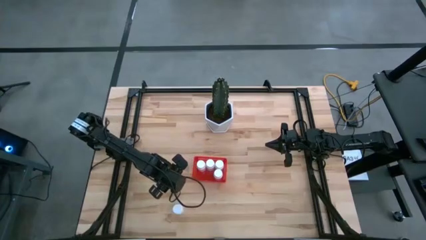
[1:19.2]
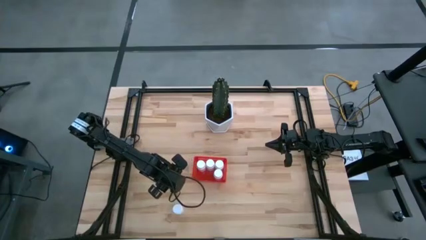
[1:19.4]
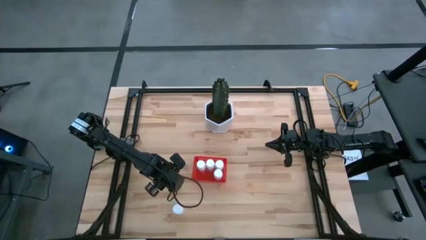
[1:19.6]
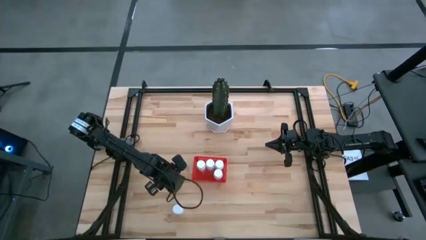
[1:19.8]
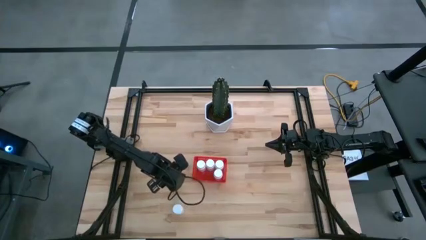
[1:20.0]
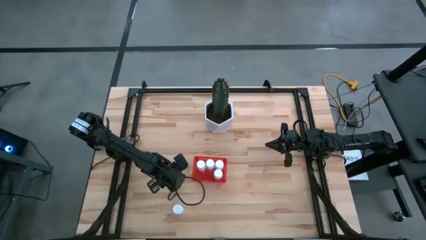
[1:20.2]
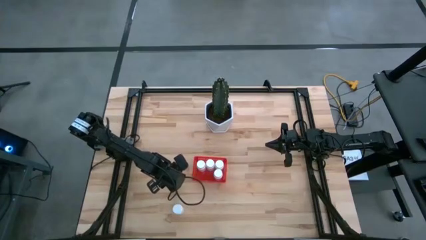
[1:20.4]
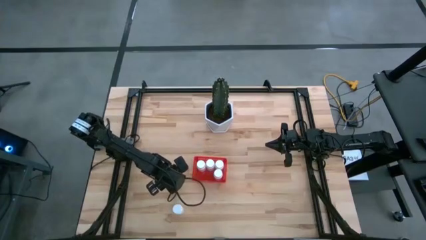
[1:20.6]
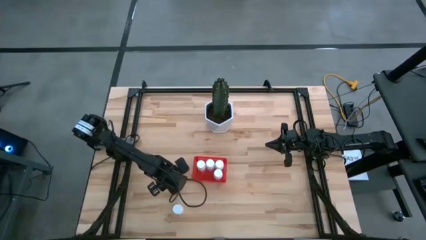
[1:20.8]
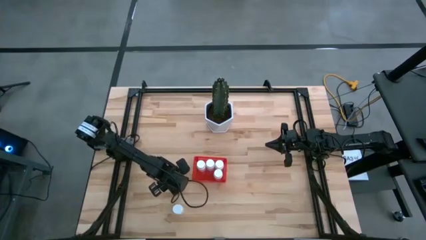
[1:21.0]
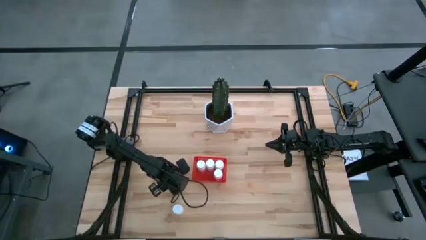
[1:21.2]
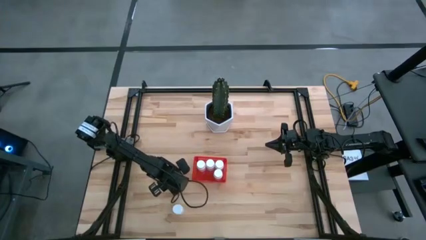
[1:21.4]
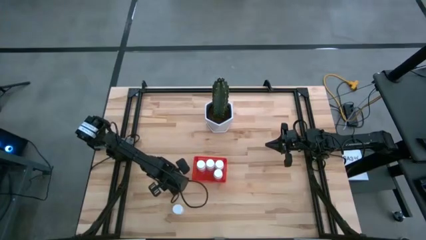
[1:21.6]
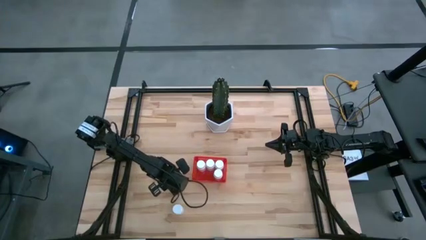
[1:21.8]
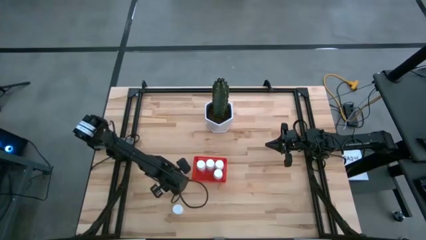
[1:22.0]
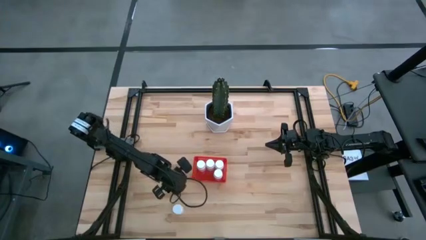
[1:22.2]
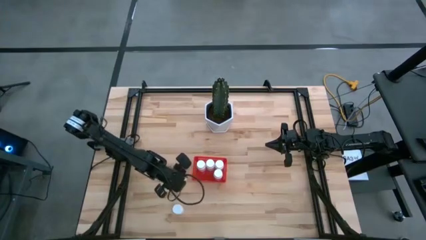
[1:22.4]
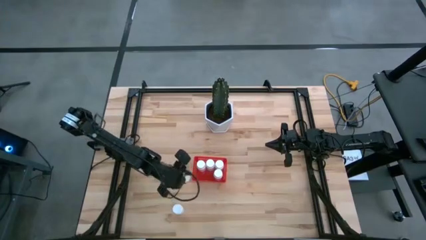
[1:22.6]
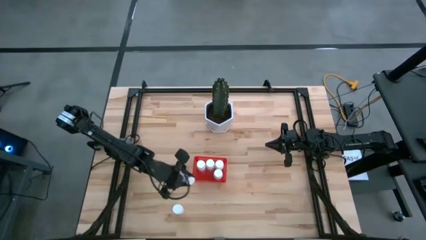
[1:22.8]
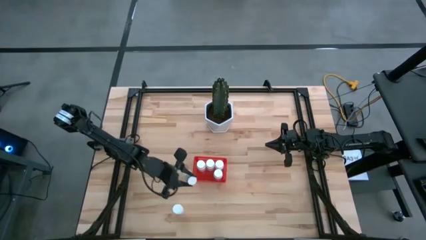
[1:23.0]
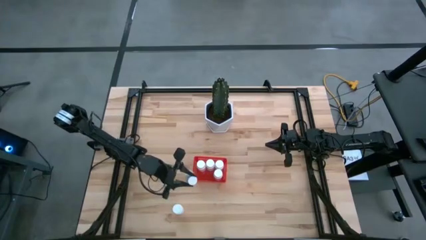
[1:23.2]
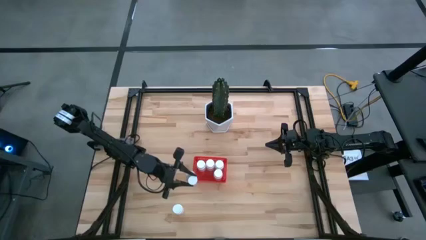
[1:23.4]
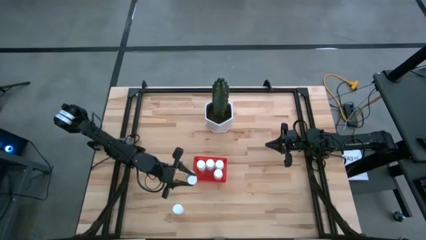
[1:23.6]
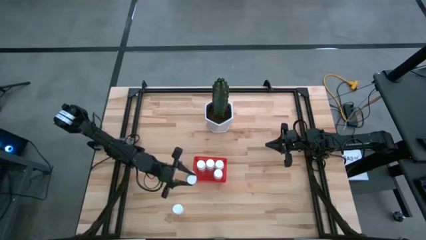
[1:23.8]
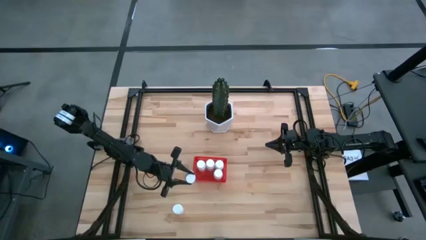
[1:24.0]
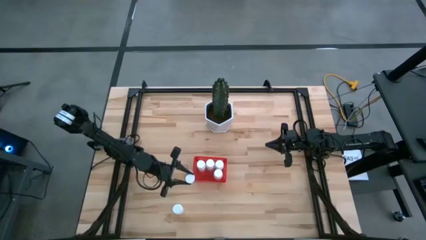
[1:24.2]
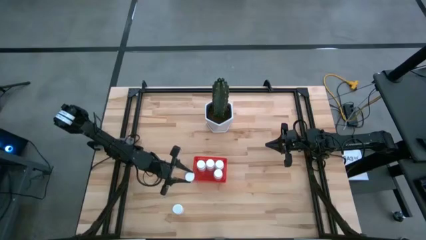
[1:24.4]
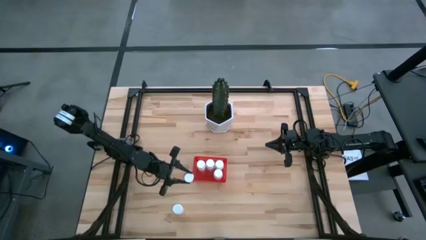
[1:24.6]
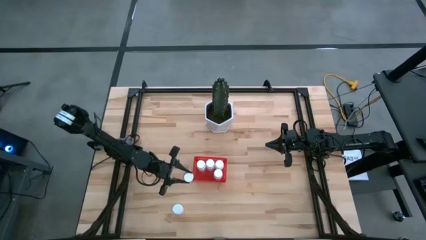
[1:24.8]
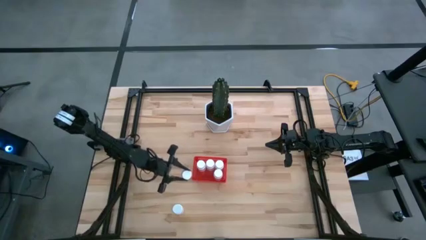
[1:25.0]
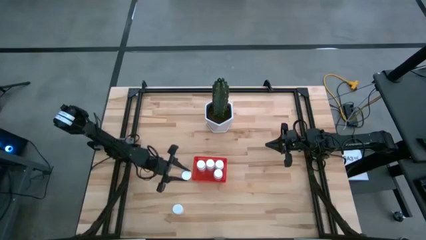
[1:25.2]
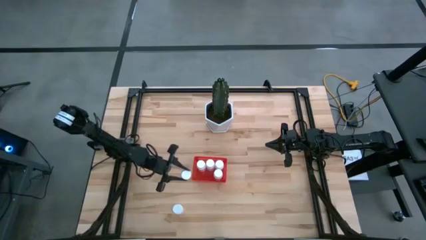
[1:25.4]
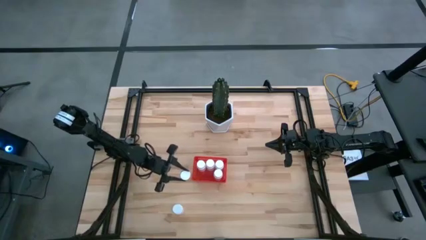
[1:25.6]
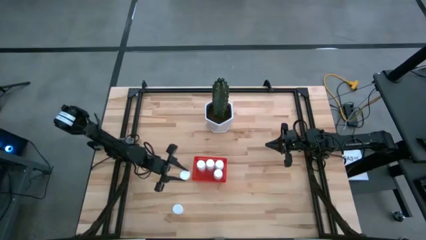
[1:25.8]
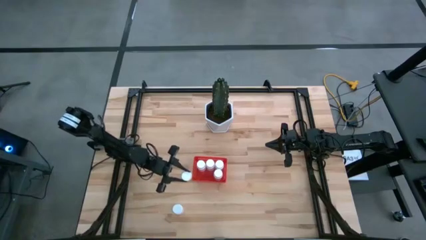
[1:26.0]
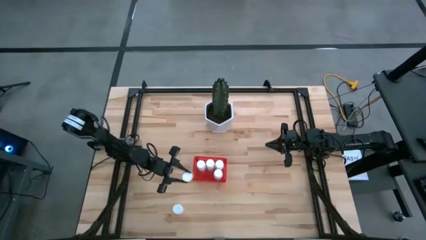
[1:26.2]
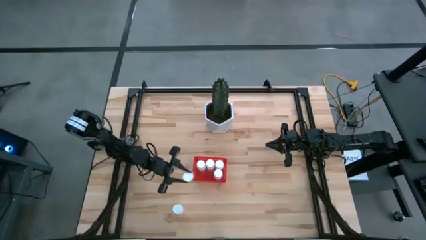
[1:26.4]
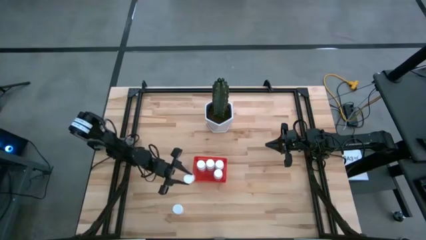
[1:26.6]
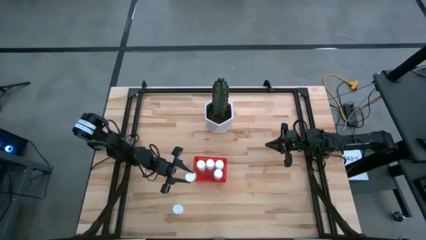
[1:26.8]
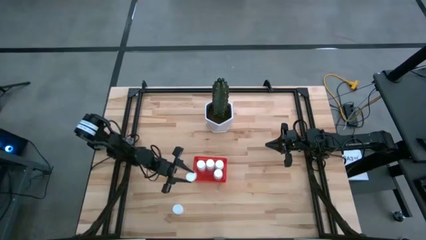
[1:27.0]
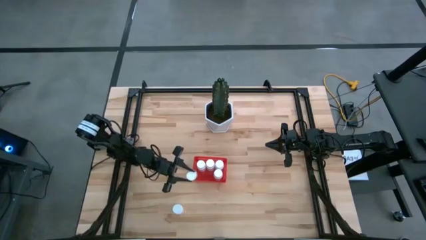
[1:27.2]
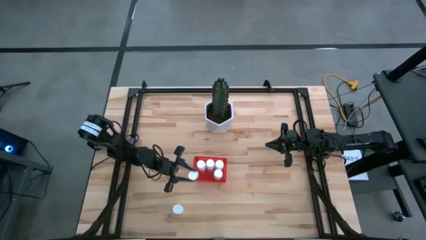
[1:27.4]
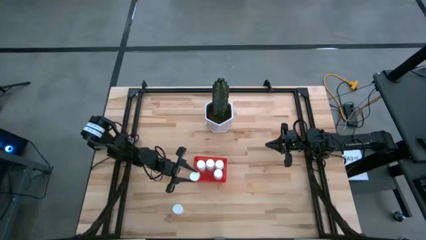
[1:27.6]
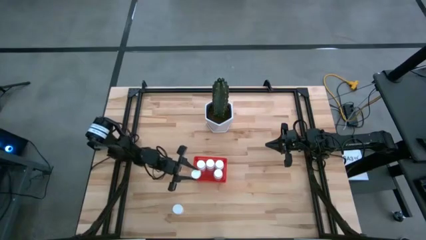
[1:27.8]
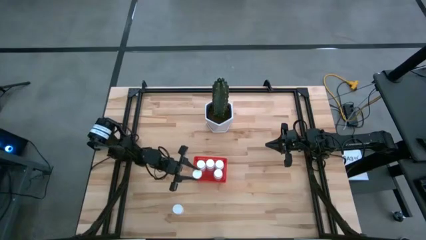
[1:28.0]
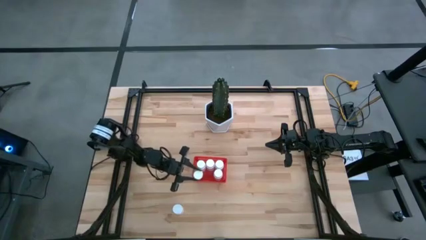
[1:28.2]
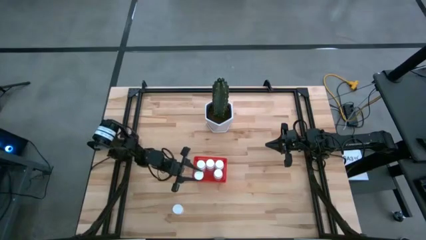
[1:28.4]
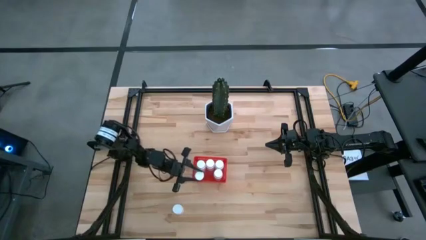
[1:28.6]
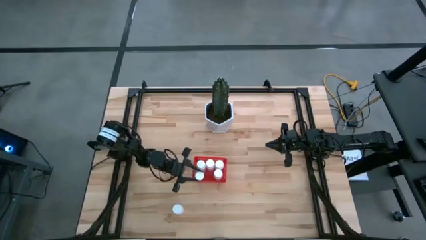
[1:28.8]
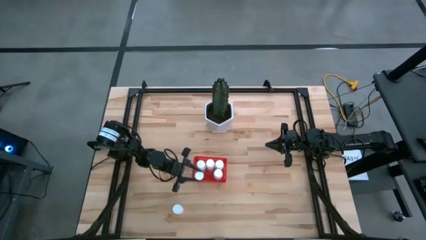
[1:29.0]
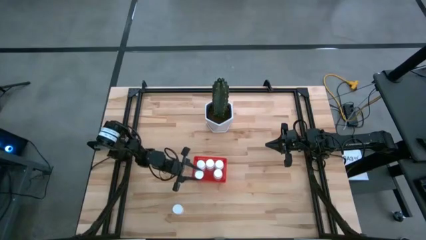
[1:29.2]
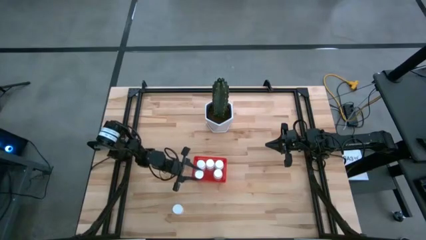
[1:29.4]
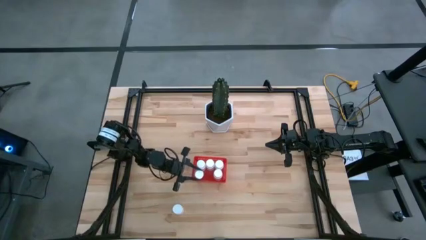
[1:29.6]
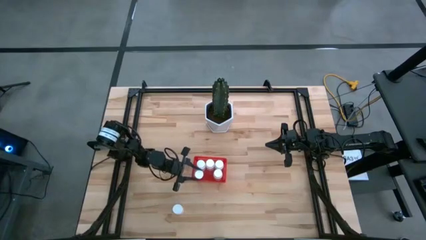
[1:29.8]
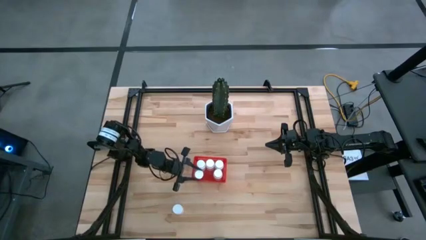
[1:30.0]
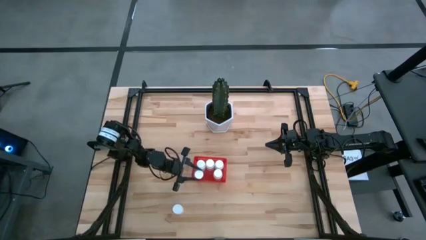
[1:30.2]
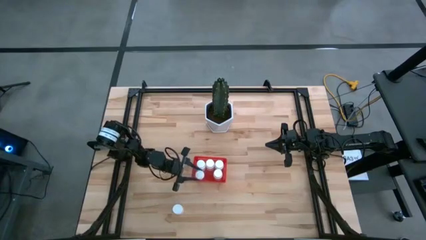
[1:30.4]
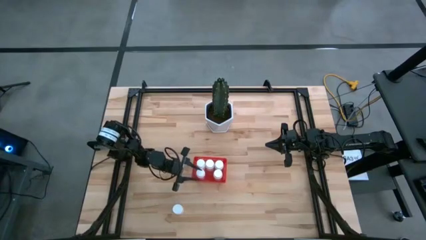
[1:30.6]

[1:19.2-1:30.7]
Task: Pick and place pill bottles into a basket
Put the white pill bottle into the red bin
